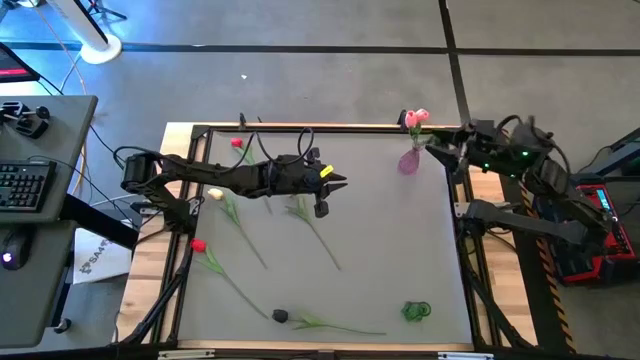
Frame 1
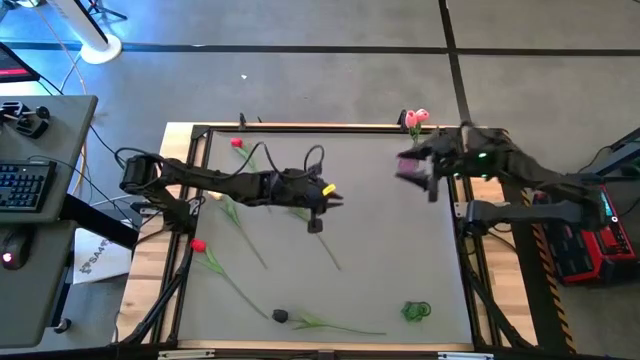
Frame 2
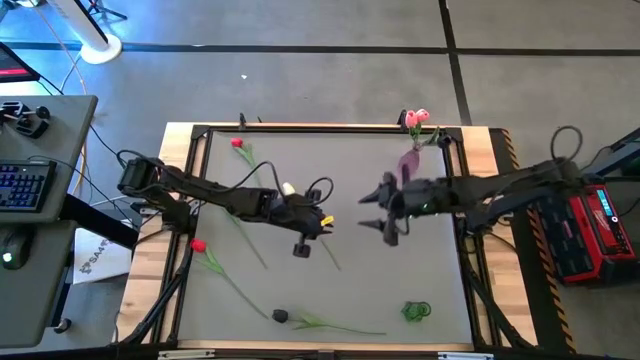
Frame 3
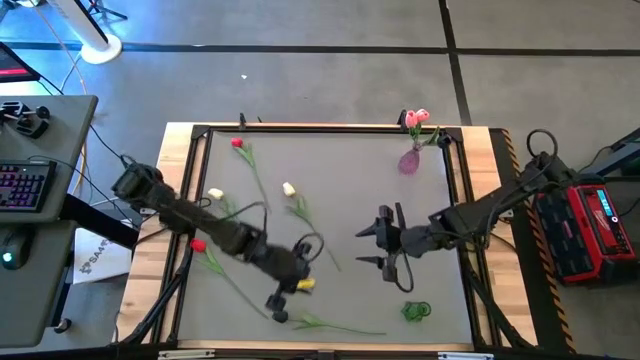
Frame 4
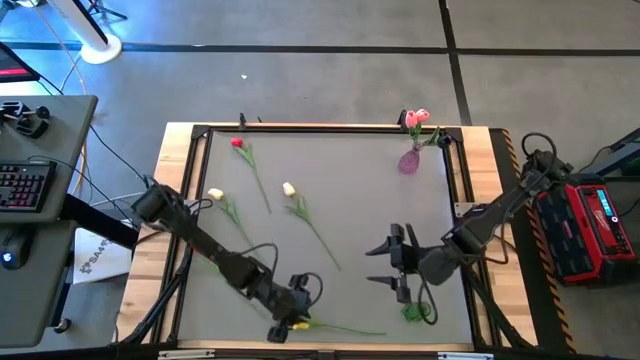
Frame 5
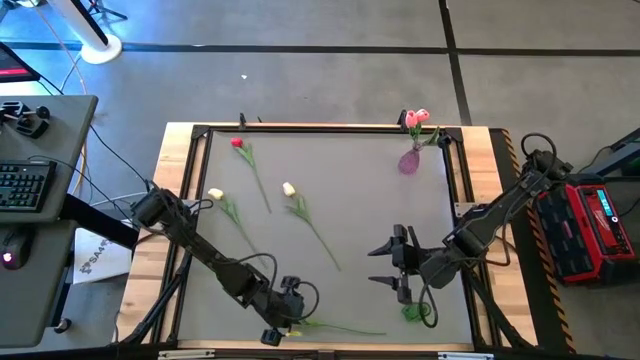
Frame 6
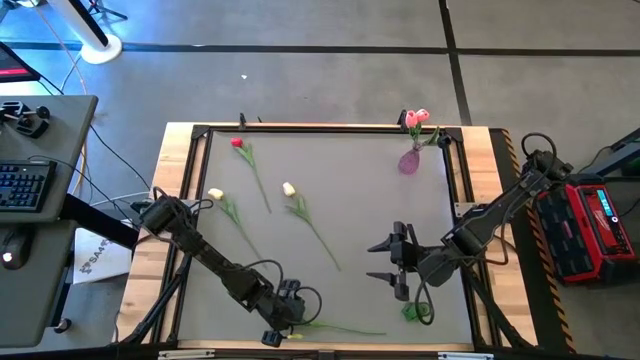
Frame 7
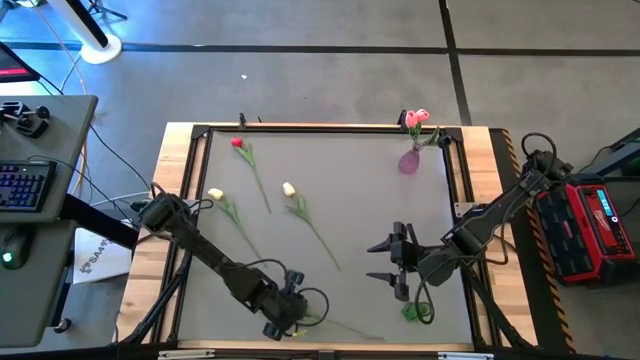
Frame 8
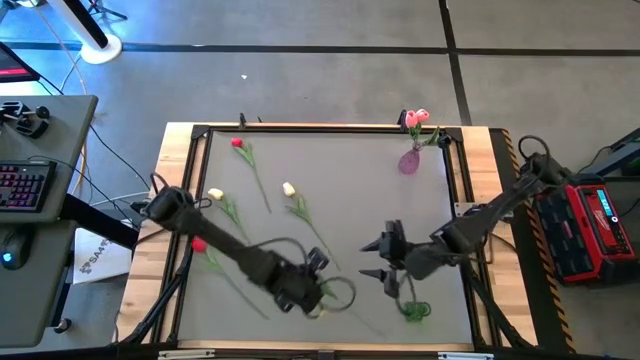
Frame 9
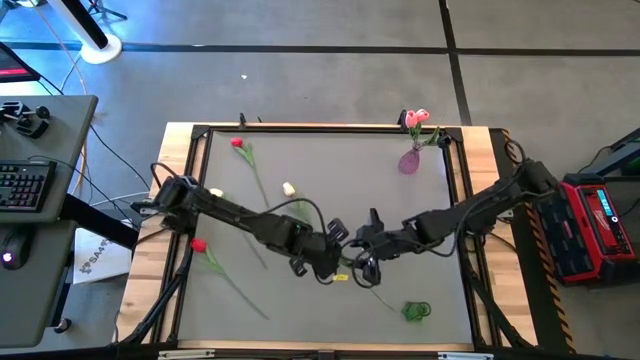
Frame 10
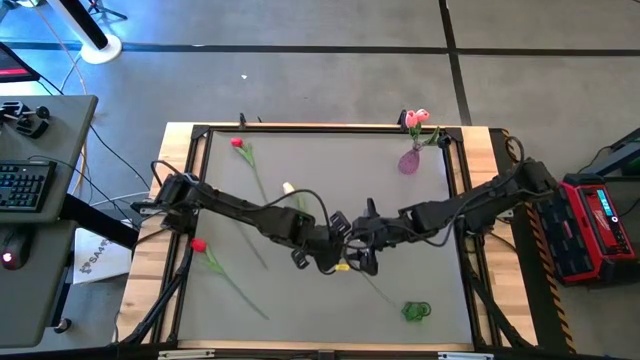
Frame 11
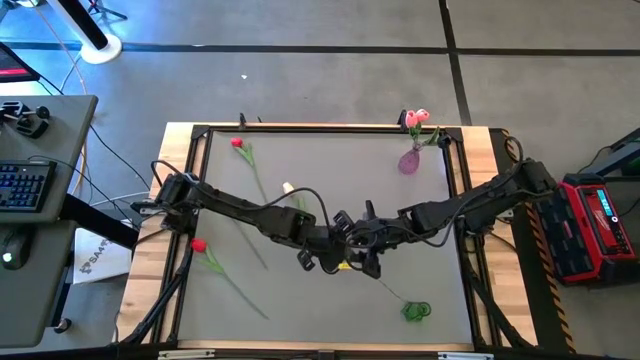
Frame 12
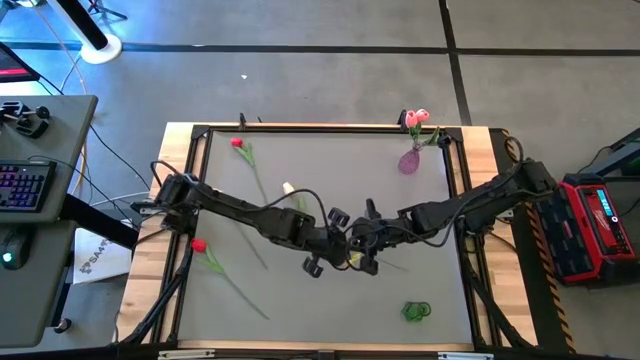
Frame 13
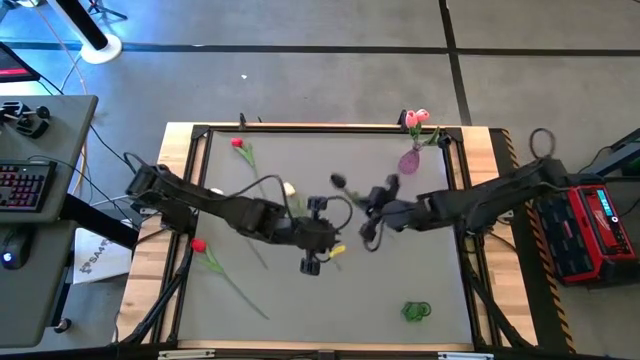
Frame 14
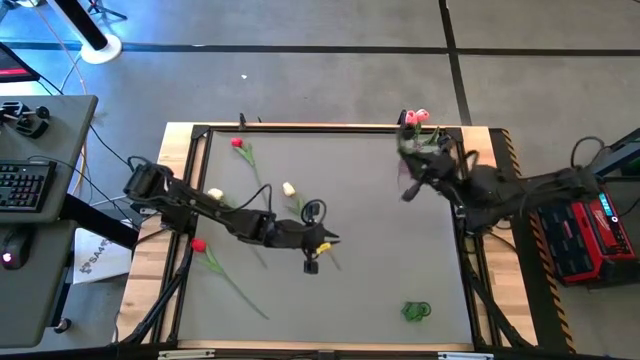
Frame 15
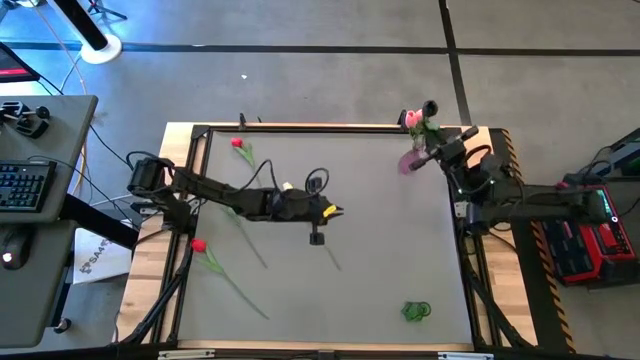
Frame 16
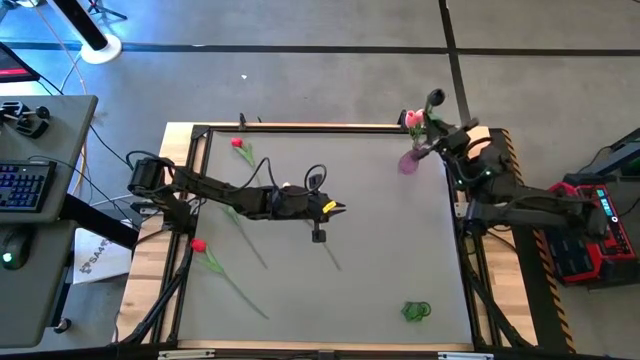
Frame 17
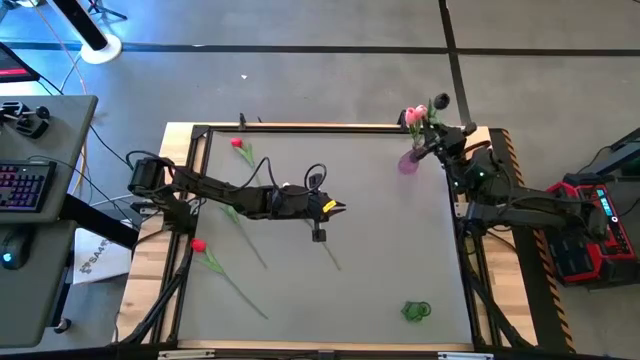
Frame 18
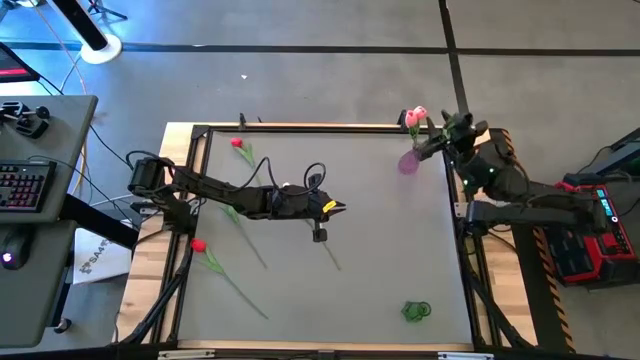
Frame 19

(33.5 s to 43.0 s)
Task: Sort flowers into vase by color
Put the black tulip into the violet vase

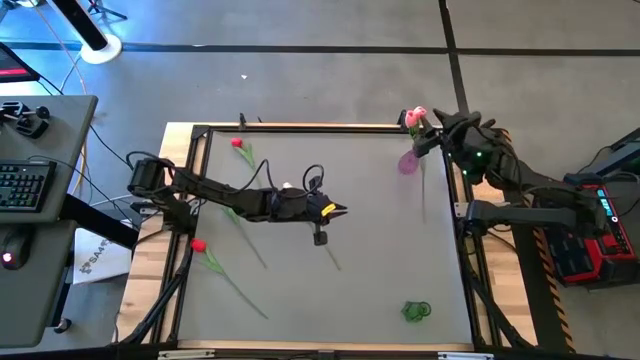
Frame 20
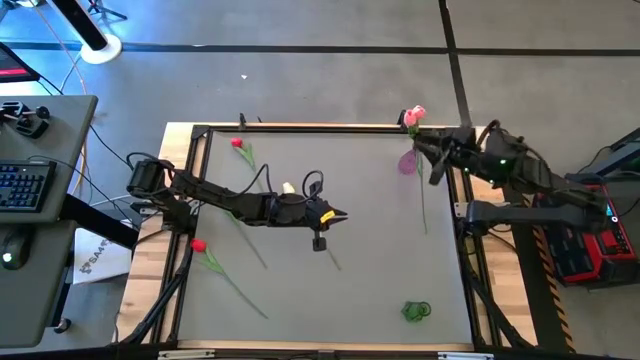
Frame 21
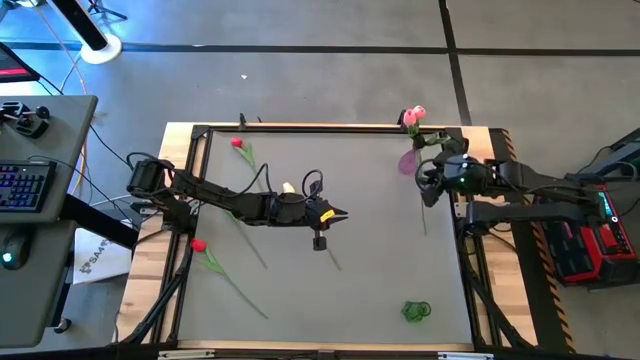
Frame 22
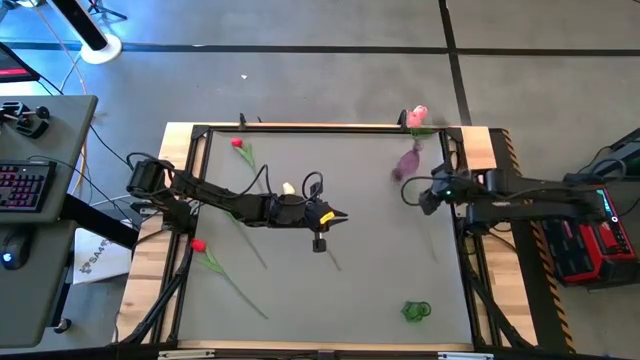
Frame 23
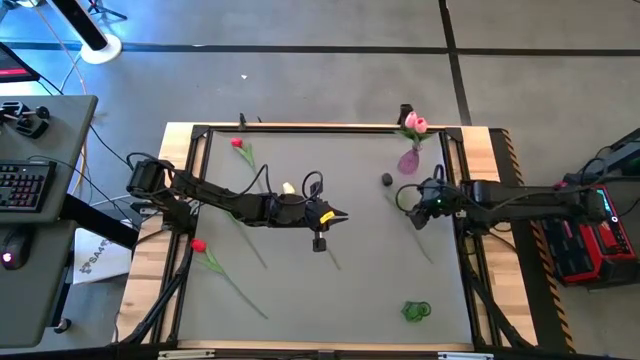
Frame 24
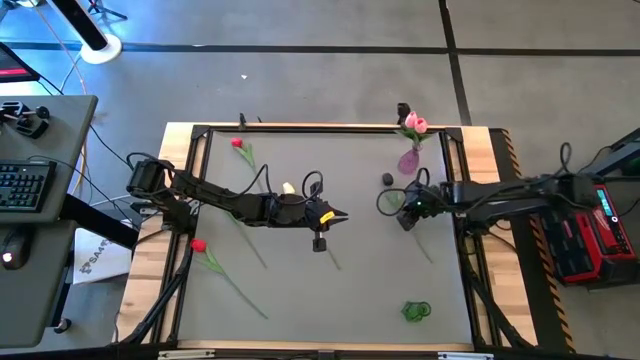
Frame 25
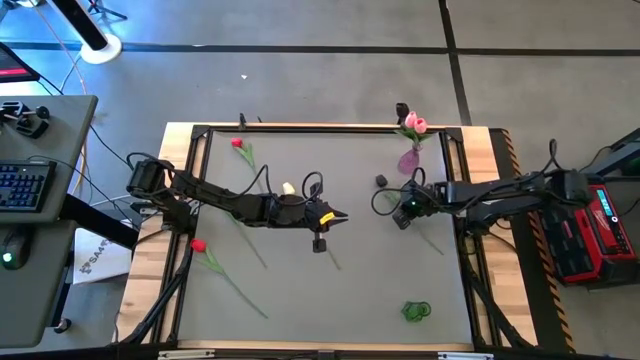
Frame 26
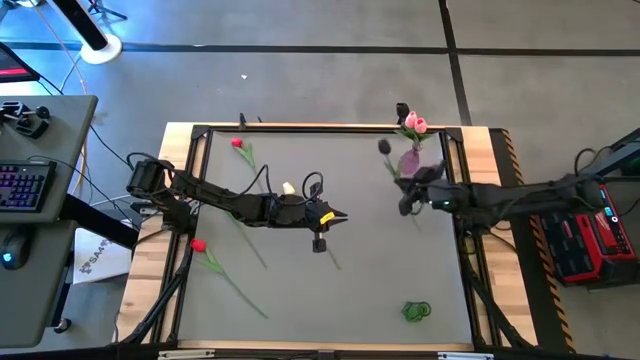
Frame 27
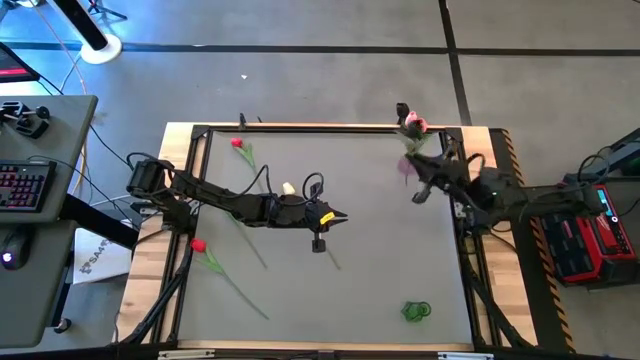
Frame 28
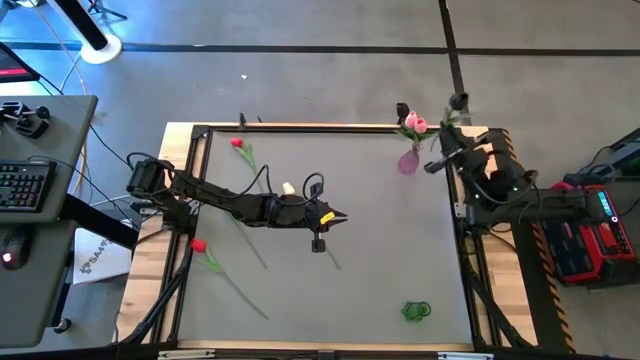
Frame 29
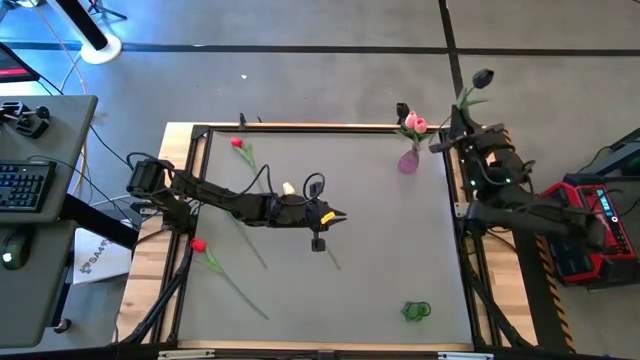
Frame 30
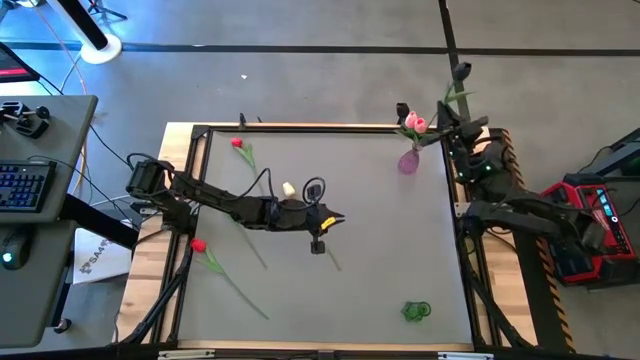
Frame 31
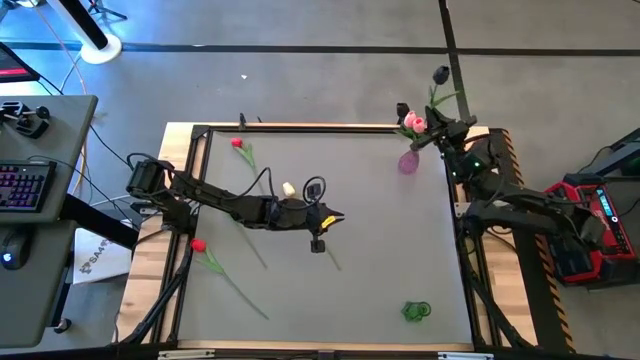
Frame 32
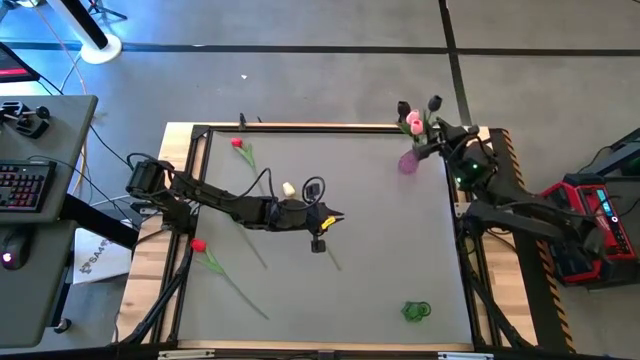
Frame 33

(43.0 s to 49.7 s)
Put the black tulip into the violet vase

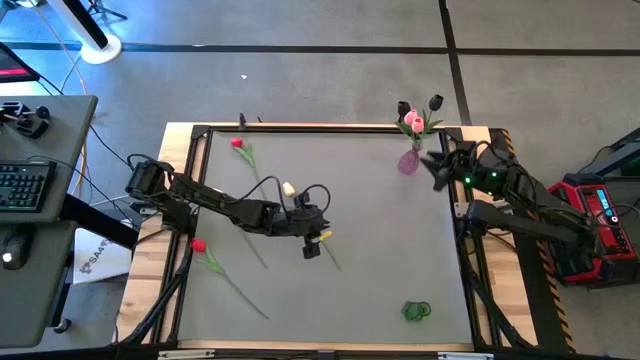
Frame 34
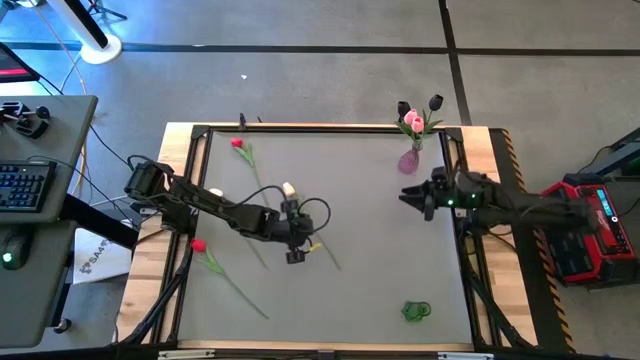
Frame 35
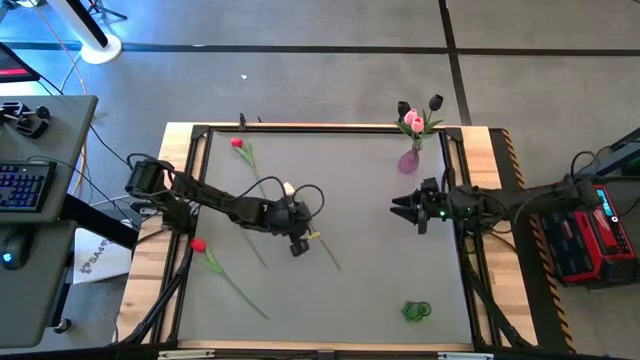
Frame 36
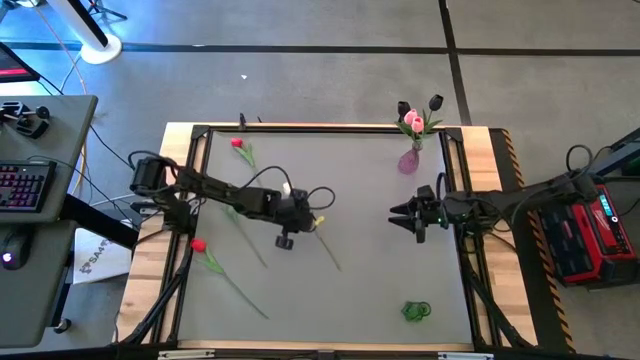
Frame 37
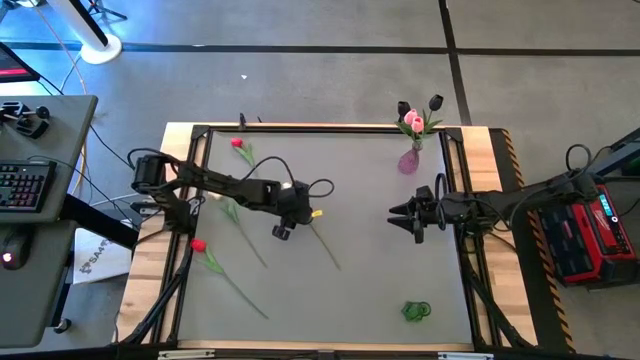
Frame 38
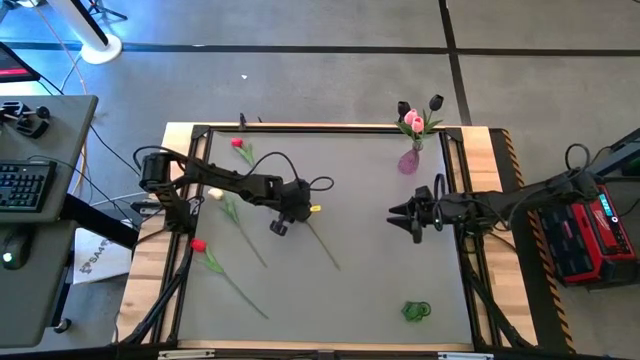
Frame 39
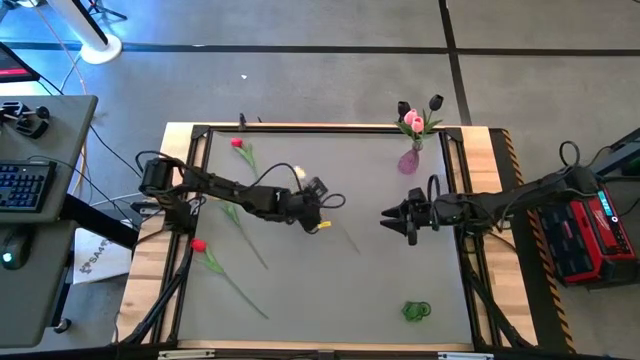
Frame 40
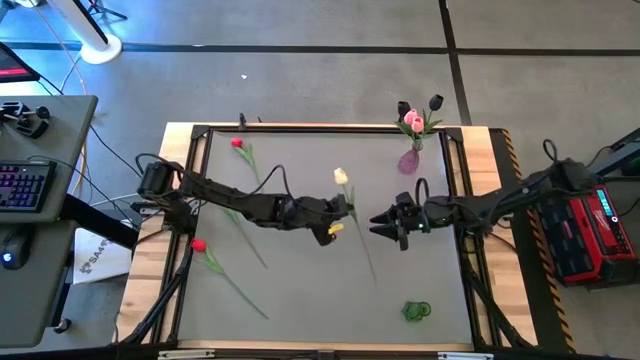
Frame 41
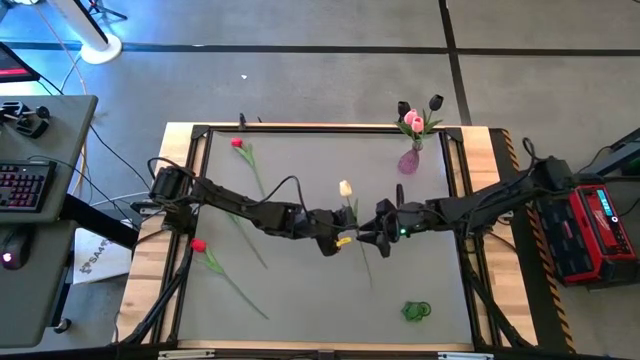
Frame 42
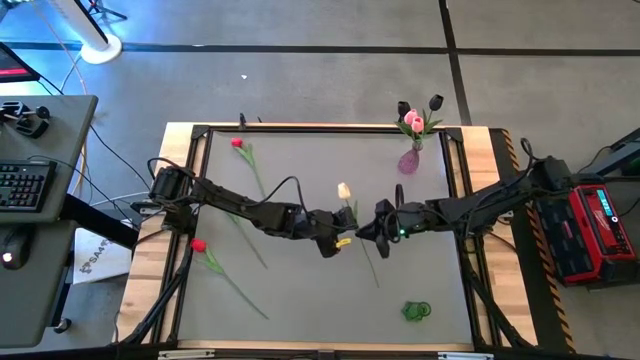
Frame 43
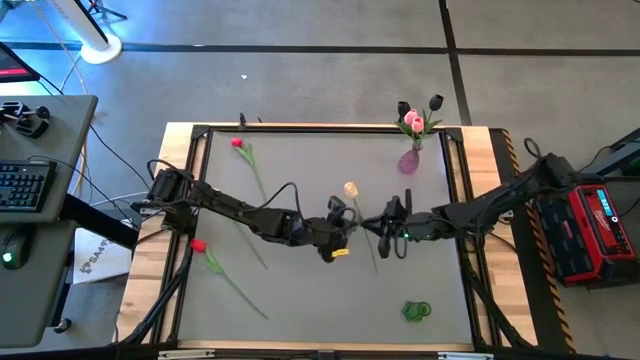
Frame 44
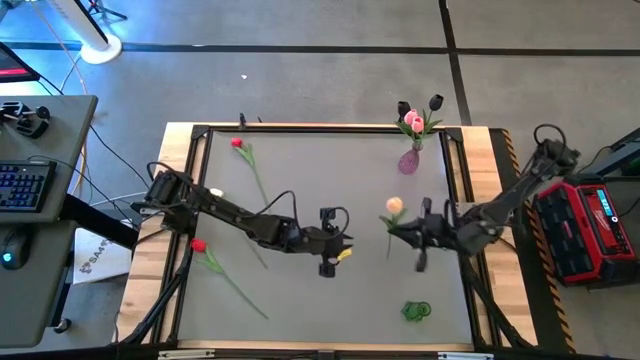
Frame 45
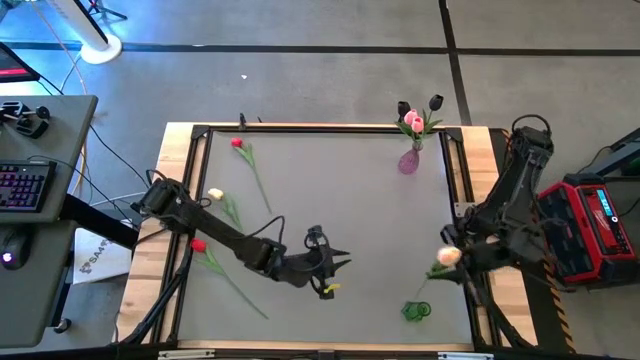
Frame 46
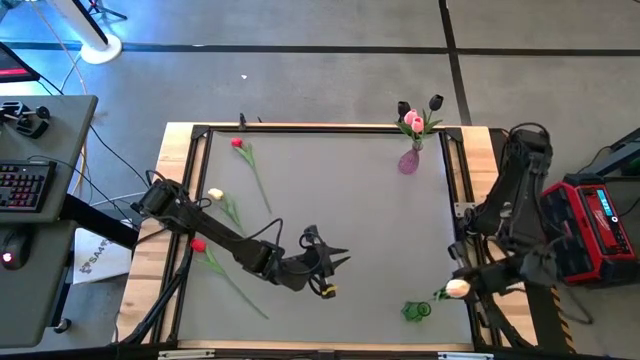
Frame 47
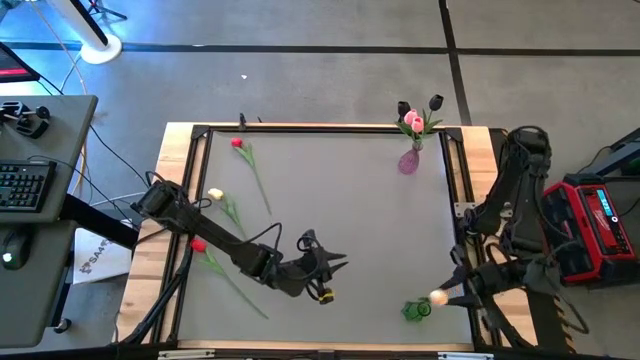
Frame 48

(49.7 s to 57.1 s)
Put the right white tulip into the green vase
